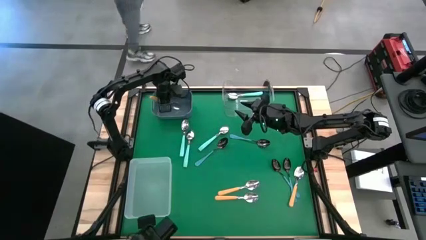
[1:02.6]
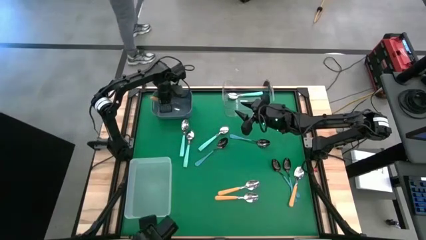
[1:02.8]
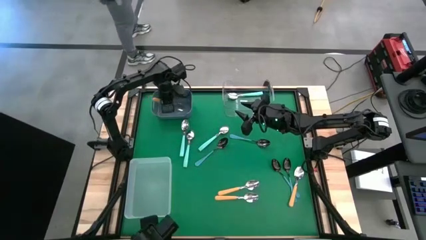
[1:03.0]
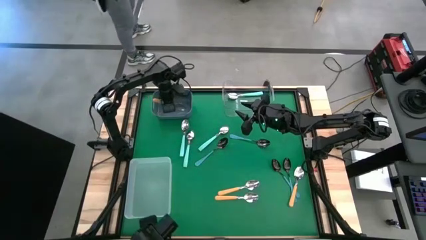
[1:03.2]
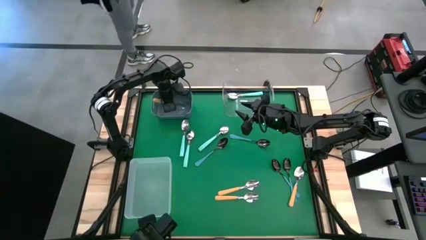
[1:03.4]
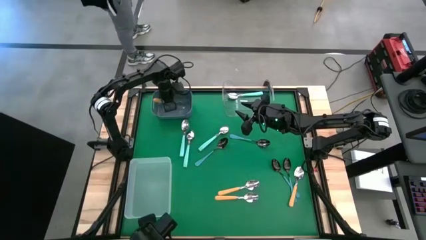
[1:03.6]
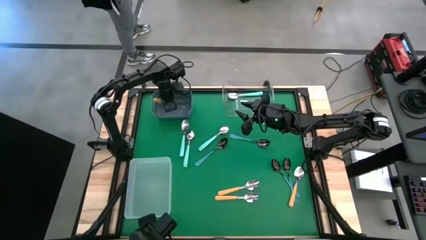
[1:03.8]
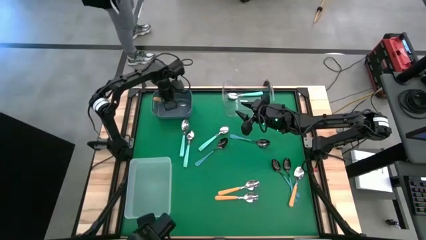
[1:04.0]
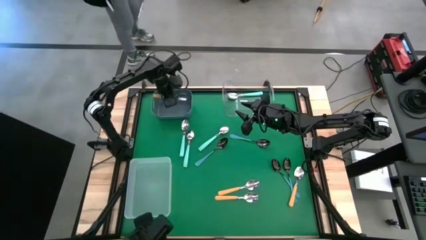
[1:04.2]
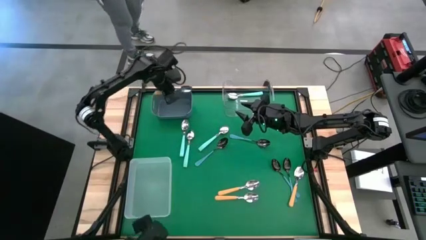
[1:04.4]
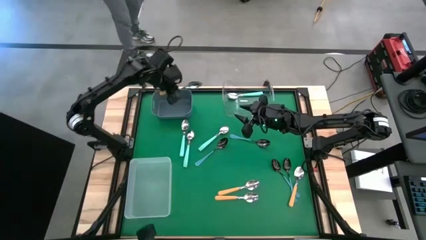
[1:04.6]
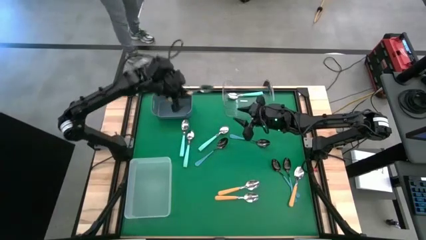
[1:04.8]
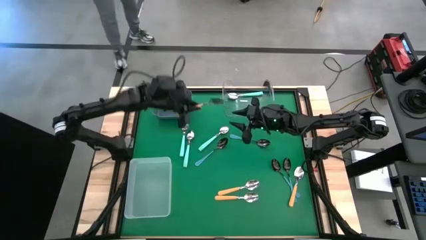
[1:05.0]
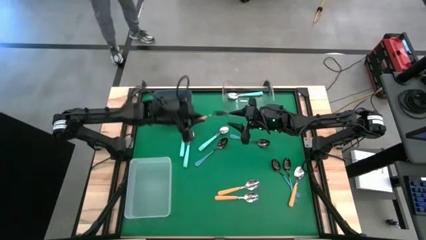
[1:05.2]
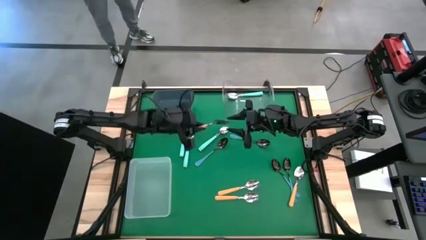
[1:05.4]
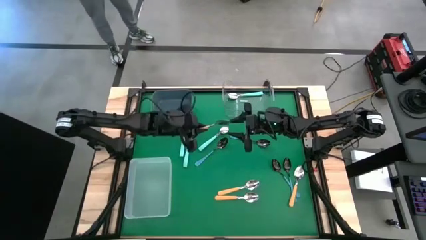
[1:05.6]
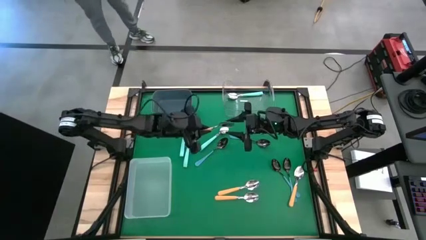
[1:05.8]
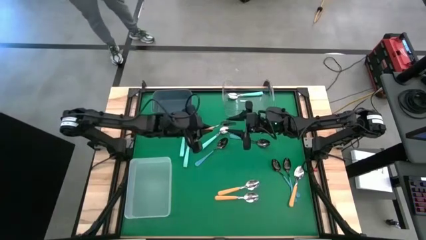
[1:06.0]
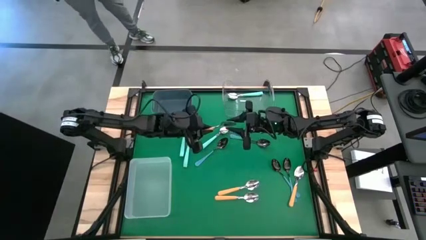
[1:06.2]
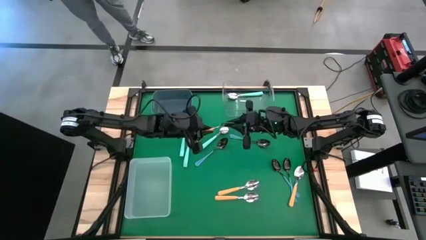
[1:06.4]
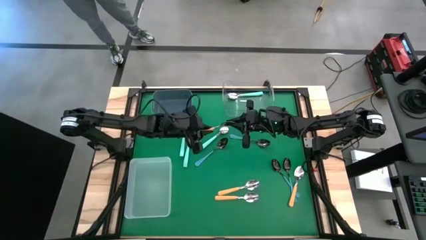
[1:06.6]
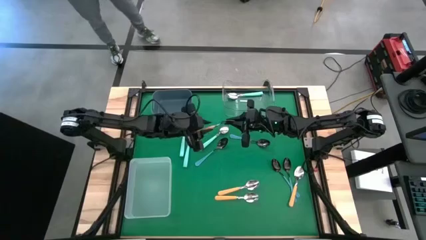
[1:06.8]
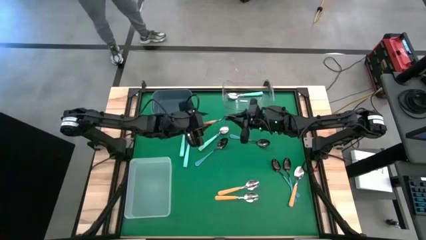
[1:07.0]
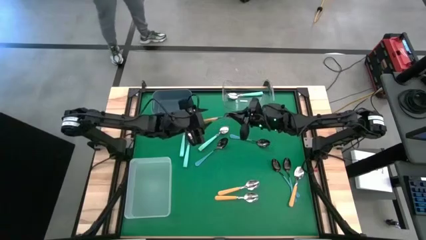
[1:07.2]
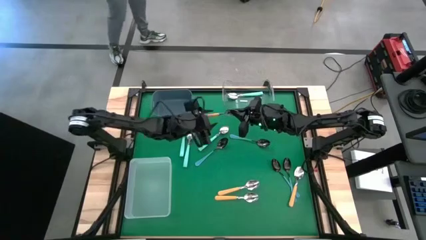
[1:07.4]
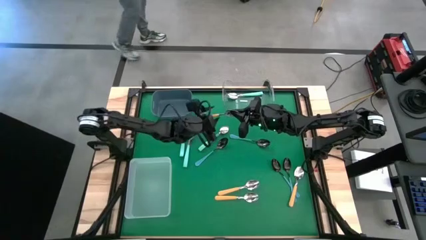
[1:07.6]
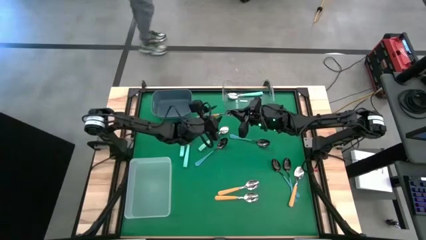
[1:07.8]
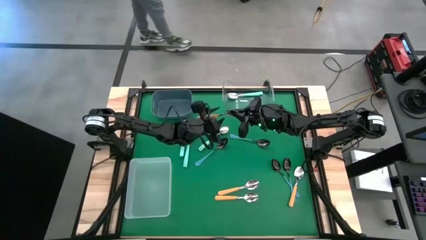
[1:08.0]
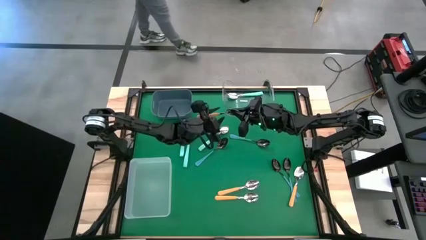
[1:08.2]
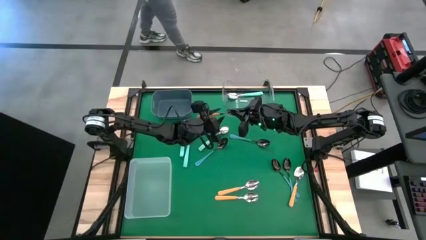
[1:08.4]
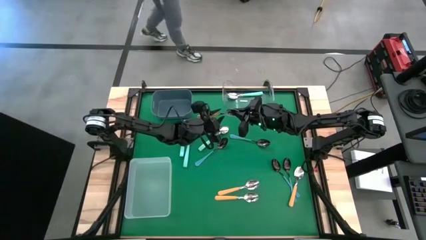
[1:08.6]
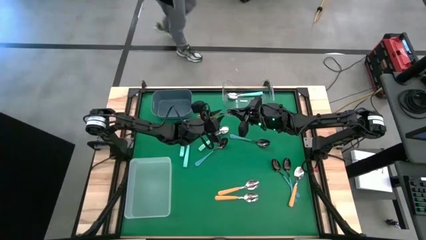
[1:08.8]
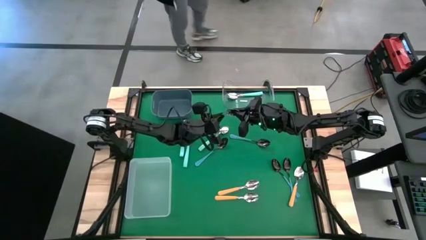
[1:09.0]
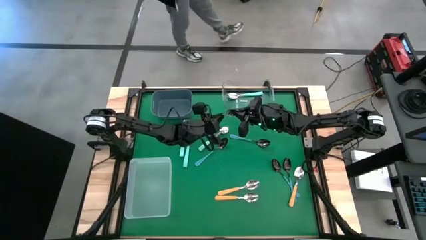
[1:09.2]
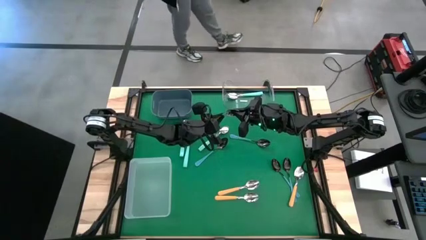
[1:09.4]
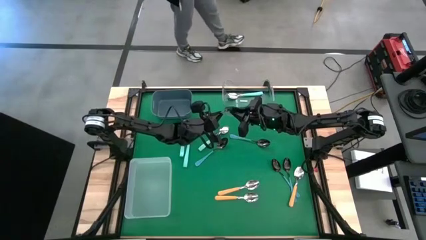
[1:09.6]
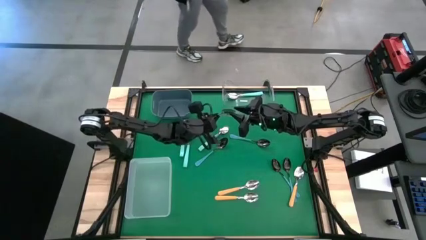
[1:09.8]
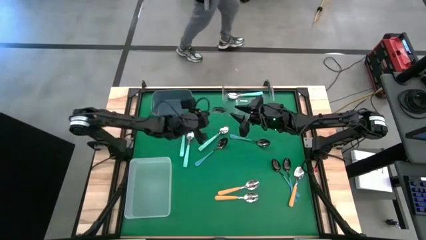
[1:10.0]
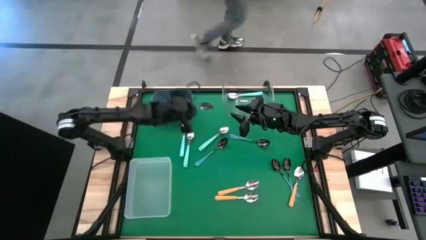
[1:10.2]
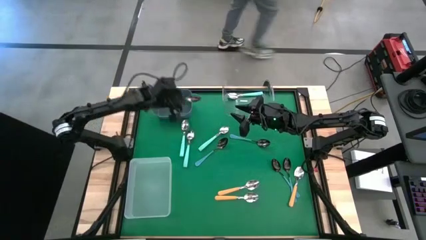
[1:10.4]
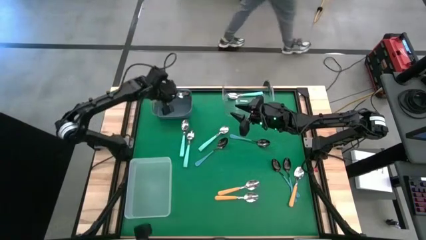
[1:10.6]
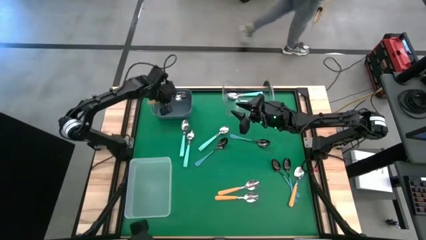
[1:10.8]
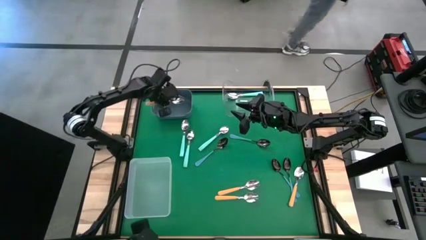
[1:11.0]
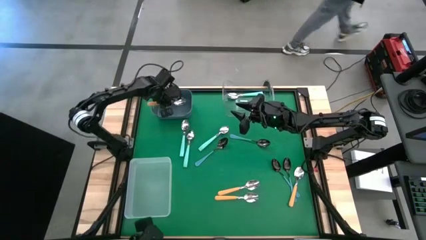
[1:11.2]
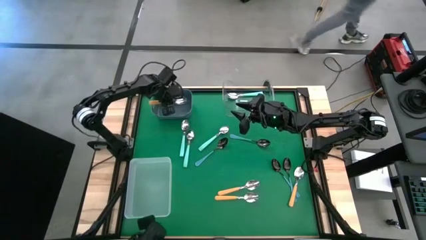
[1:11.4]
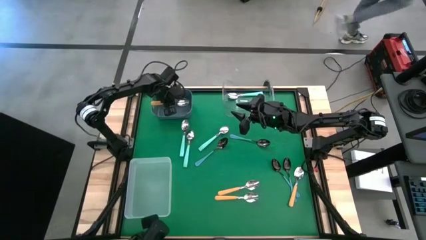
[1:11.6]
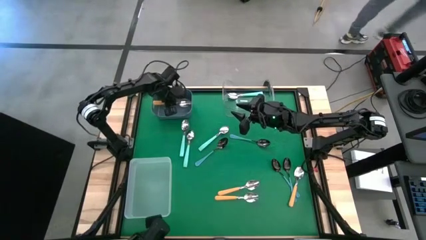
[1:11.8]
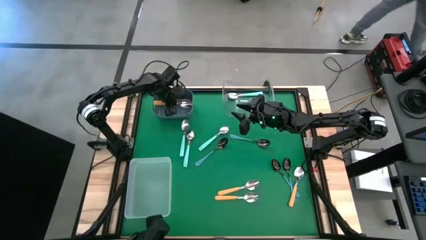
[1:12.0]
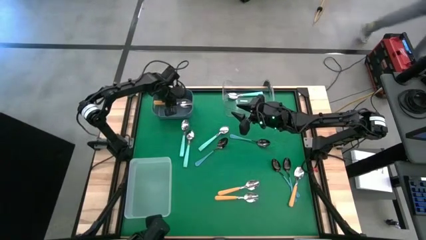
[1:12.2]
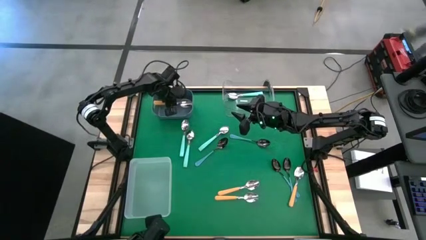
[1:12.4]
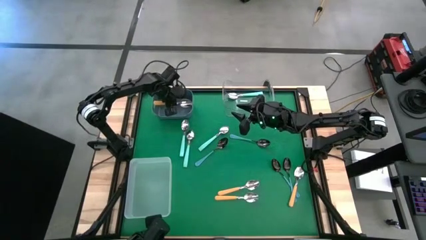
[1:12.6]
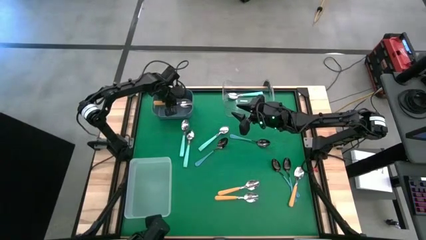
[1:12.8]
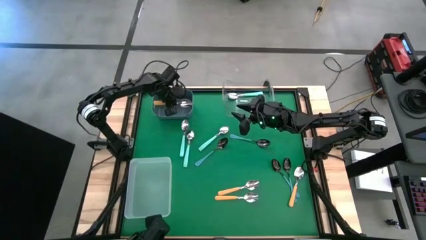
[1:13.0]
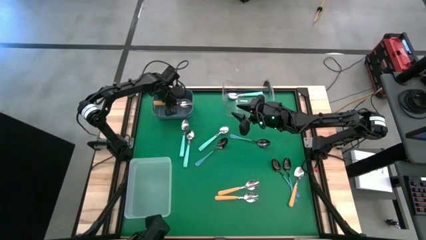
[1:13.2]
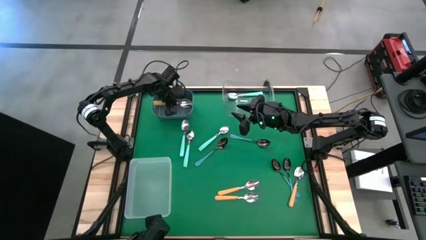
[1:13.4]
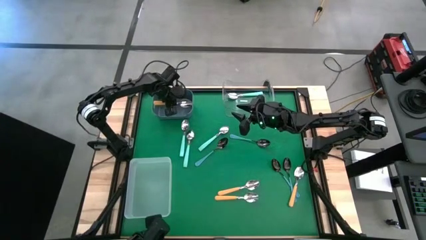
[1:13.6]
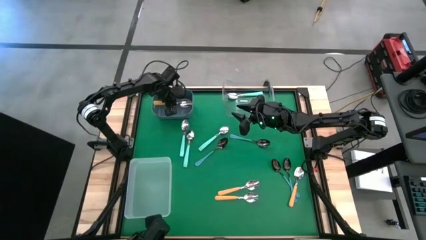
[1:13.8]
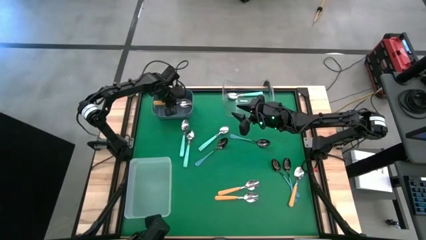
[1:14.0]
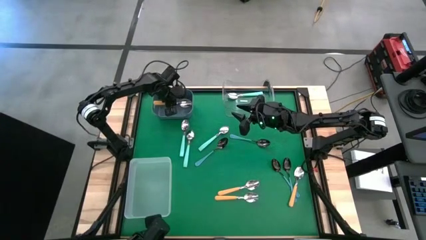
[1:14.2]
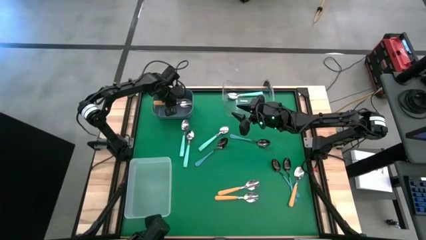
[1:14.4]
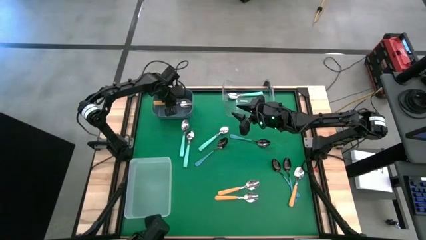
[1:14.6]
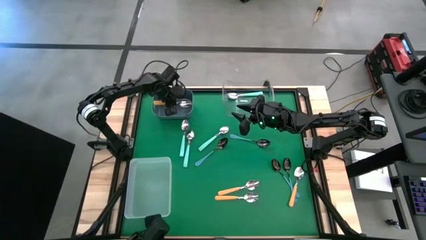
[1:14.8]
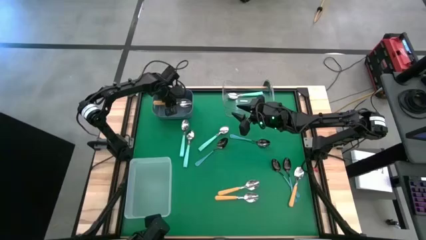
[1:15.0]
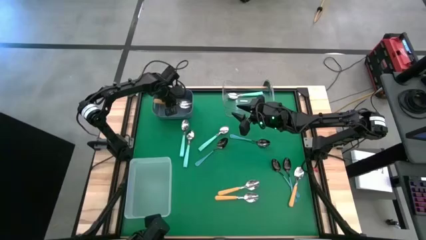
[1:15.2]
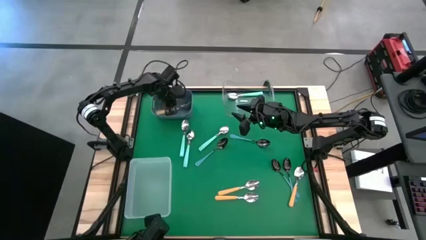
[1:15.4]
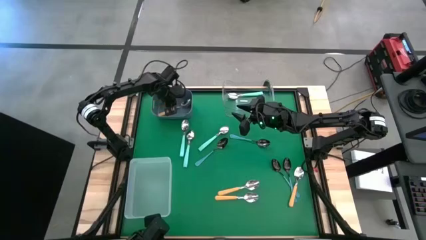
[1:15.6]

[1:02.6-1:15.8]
Task: Sort silverware by color (type)
Put the yellow spoon into the gray bin

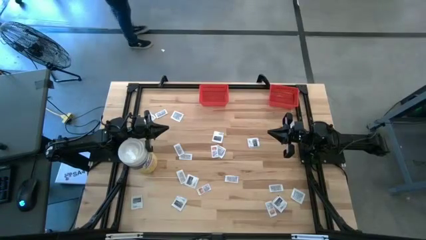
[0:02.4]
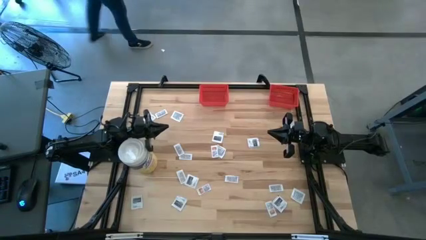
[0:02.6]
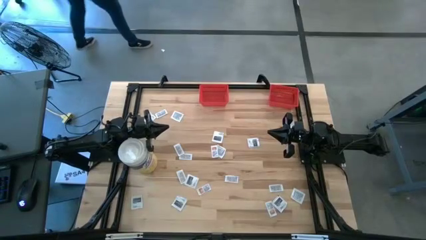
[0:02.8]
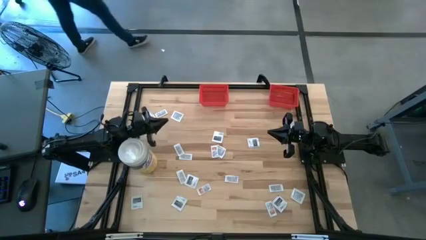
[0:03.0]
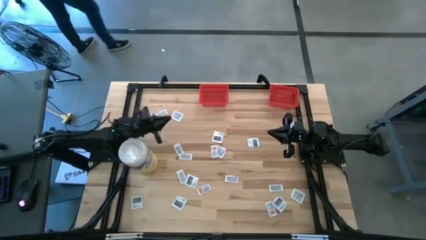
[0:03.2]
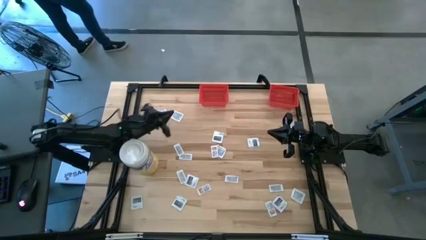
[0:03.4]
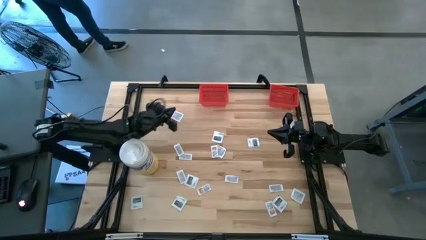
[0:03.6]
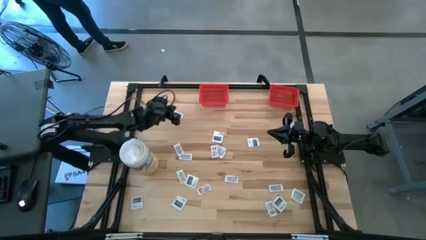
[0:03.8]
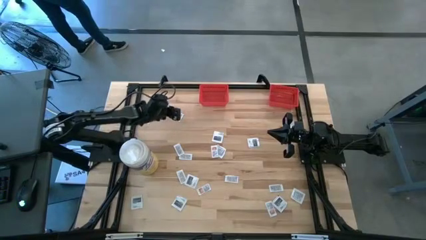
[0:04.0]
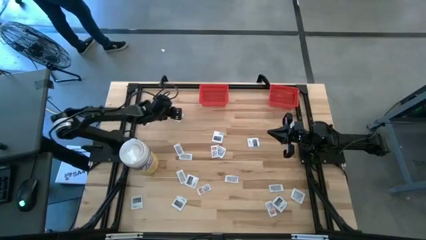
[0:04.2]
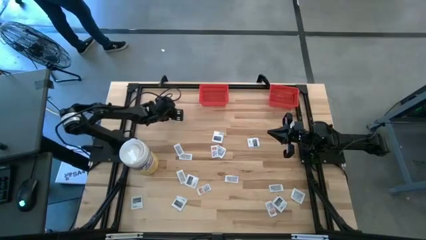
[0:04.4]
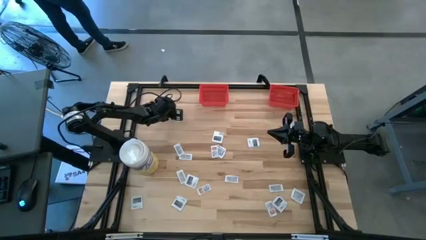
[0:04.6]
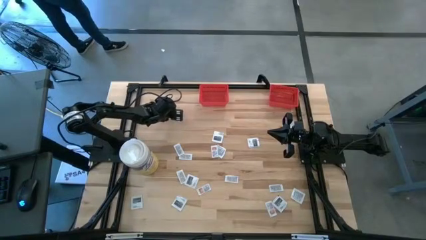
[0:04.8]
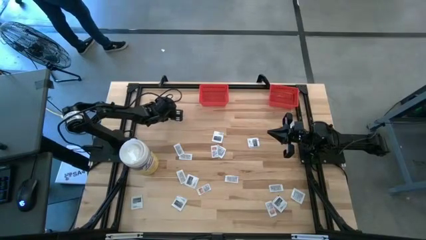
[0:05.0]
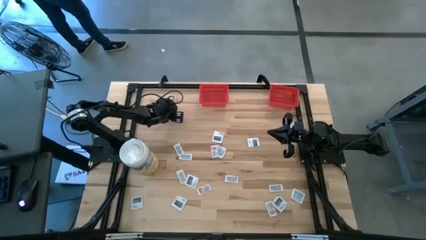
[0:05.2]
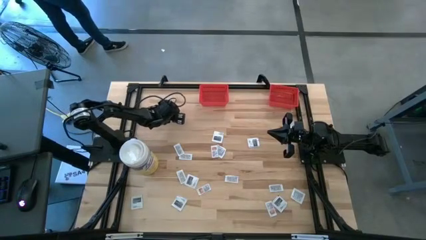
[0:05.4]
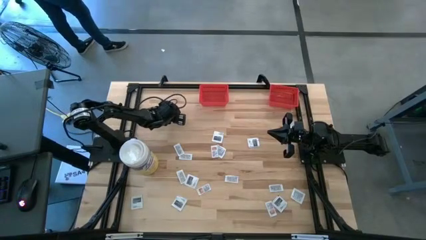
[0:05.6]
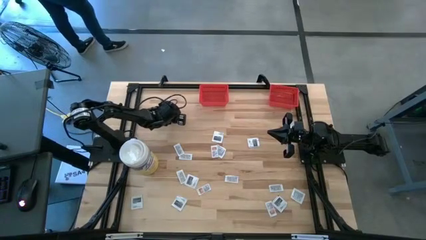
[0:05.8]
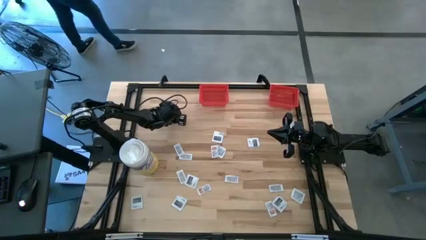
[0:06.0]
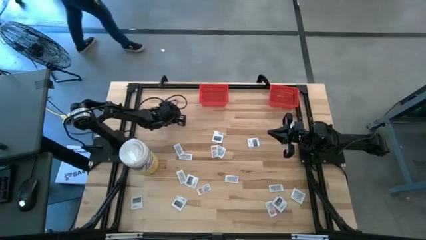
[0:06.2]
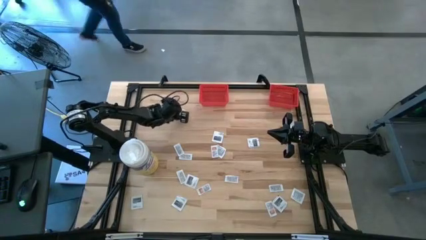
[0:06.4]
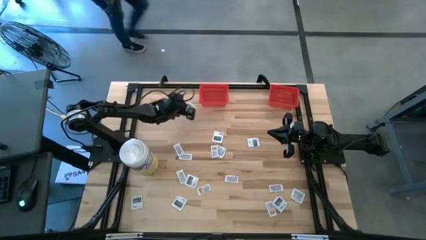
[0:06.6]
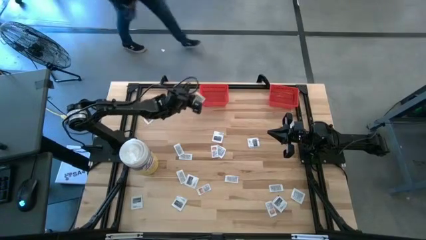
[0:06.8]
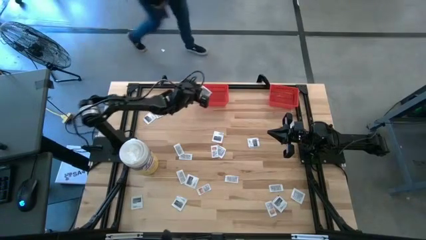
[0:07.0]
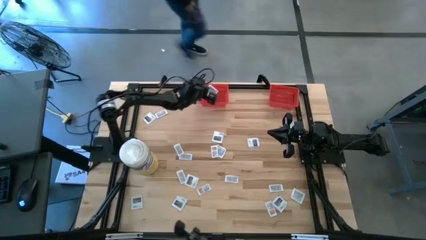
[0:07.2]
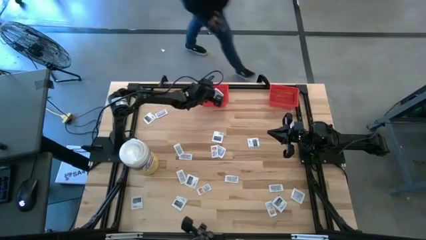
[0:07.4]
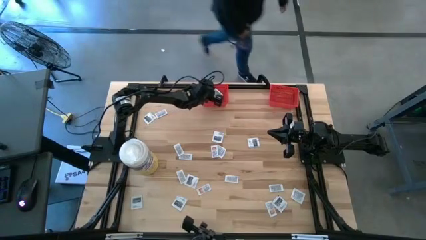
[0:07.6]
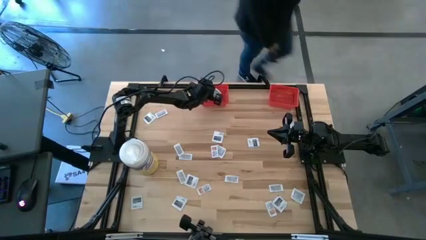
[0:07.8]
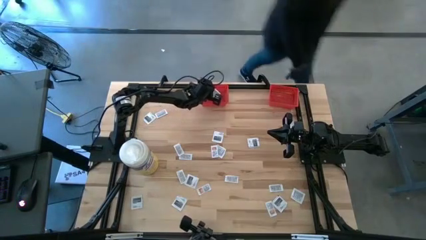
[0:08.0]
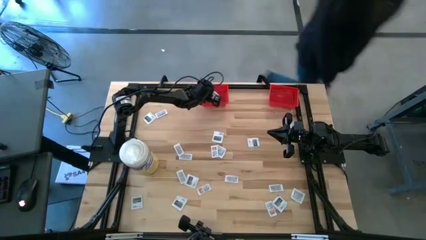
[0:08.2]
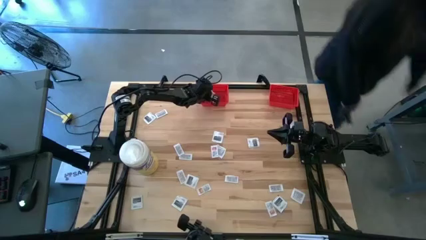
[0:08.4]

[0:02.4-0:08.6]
Task: Pick & Place First Aid Supplies
Put the towelette pack into the left red bin
